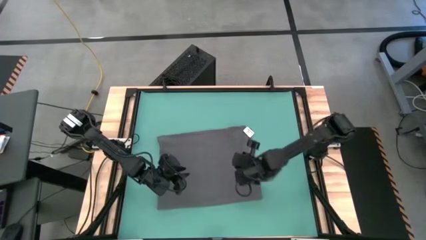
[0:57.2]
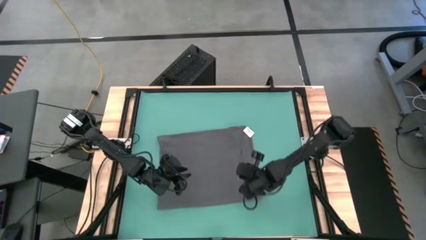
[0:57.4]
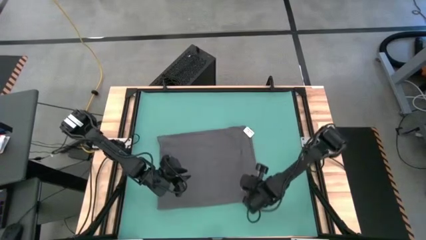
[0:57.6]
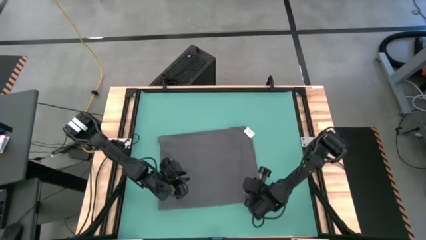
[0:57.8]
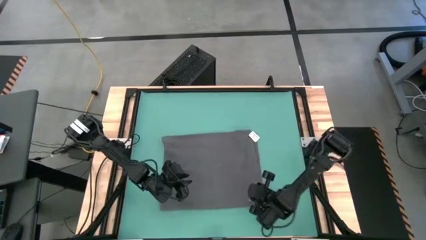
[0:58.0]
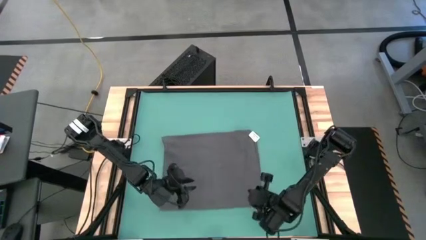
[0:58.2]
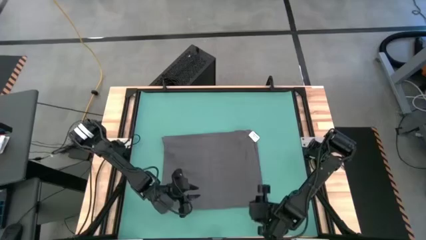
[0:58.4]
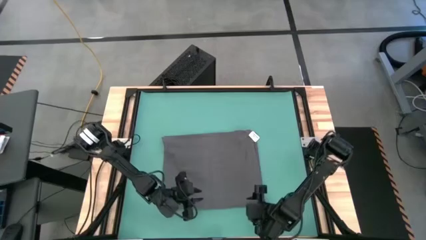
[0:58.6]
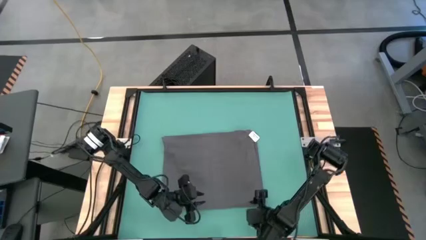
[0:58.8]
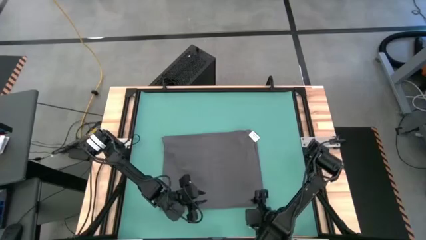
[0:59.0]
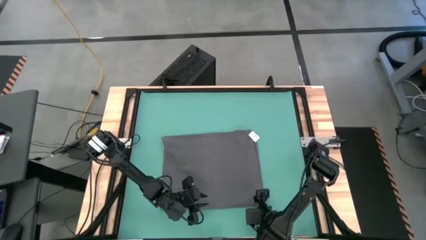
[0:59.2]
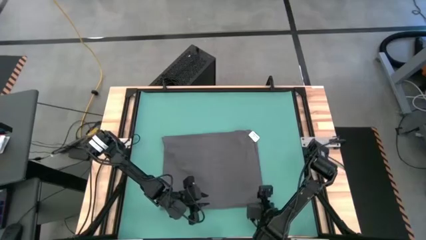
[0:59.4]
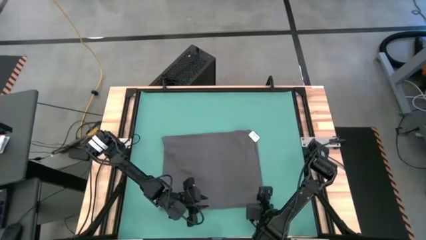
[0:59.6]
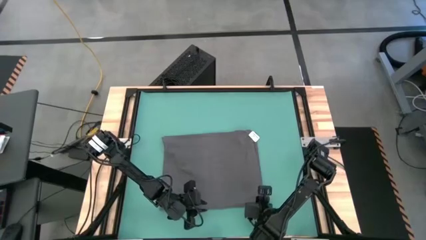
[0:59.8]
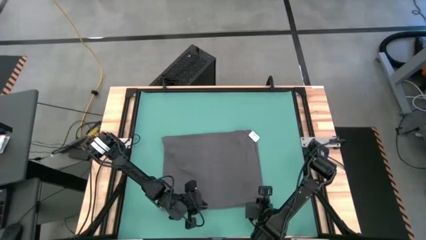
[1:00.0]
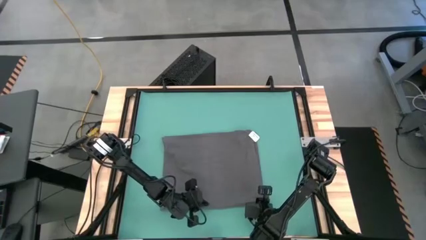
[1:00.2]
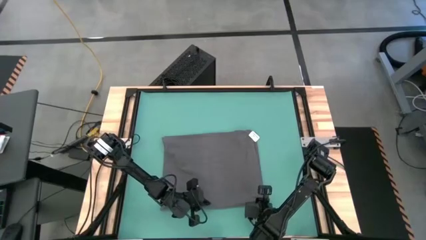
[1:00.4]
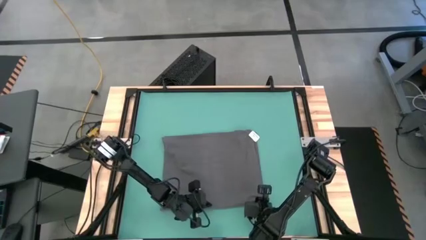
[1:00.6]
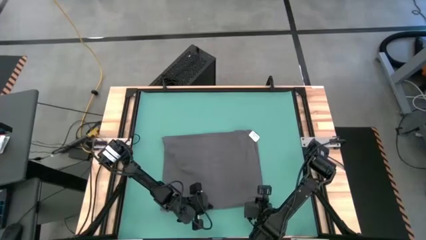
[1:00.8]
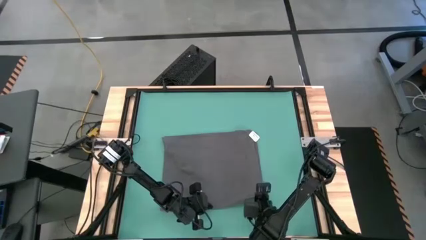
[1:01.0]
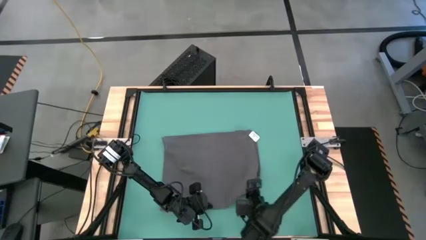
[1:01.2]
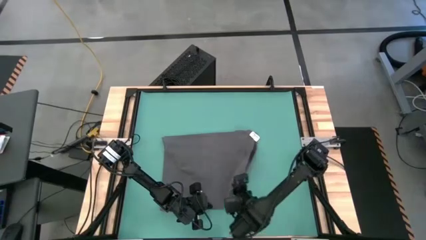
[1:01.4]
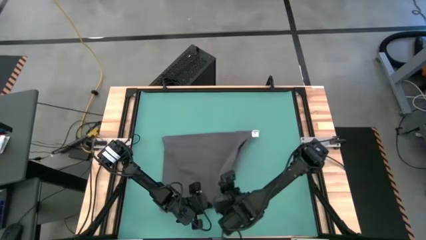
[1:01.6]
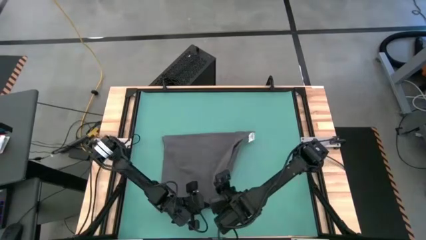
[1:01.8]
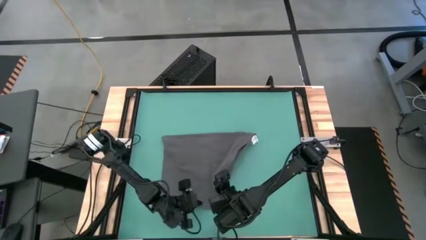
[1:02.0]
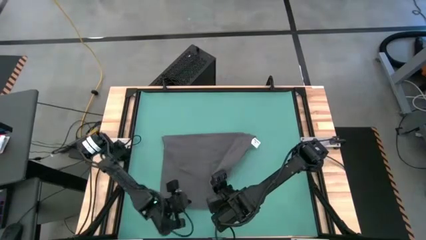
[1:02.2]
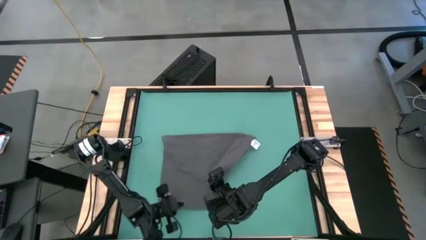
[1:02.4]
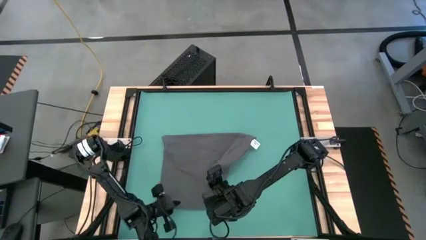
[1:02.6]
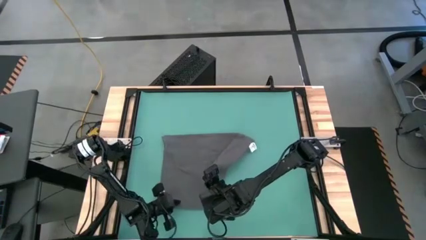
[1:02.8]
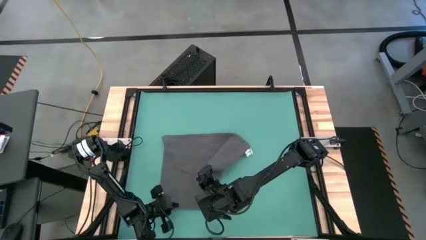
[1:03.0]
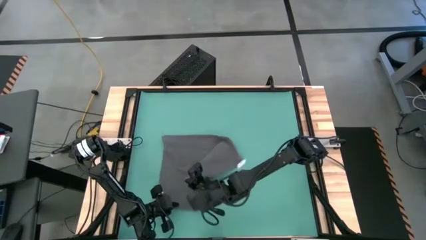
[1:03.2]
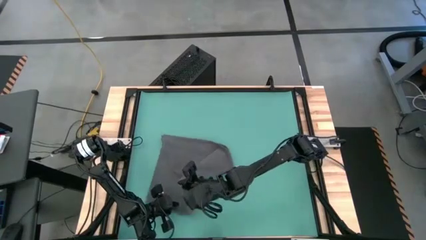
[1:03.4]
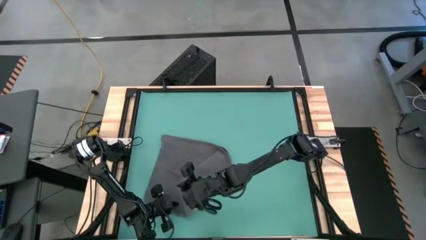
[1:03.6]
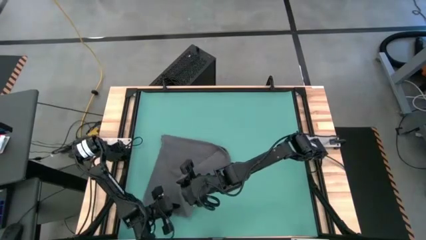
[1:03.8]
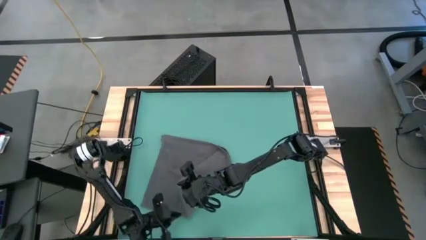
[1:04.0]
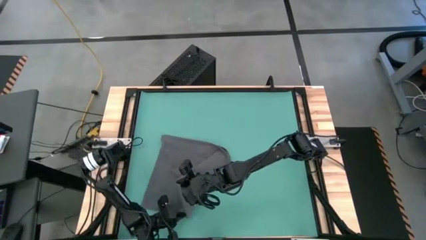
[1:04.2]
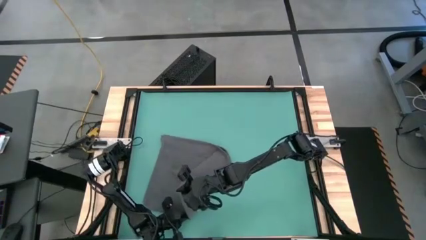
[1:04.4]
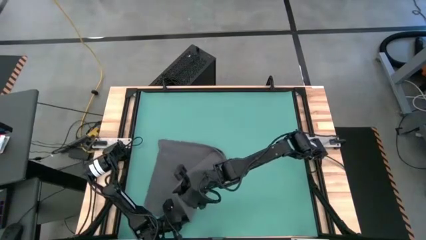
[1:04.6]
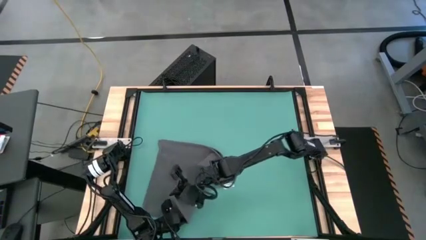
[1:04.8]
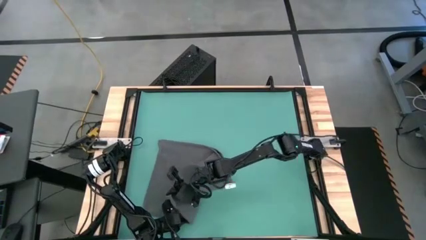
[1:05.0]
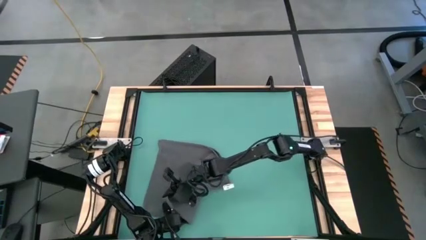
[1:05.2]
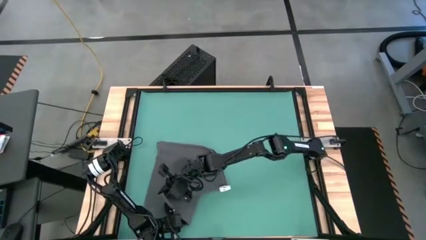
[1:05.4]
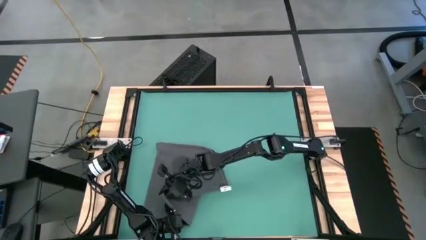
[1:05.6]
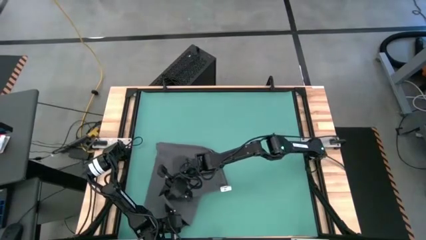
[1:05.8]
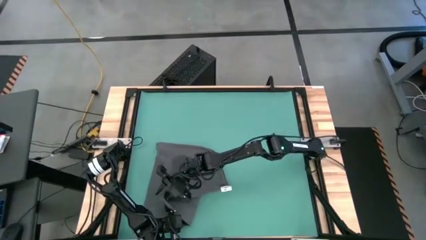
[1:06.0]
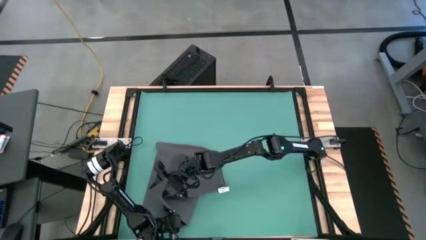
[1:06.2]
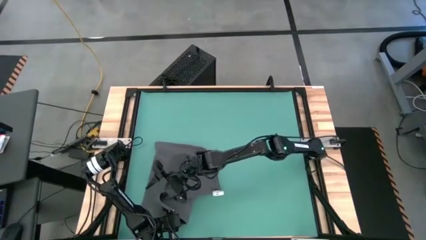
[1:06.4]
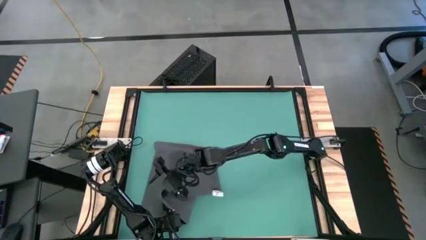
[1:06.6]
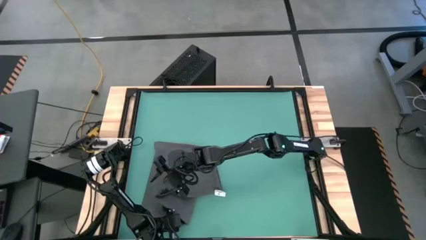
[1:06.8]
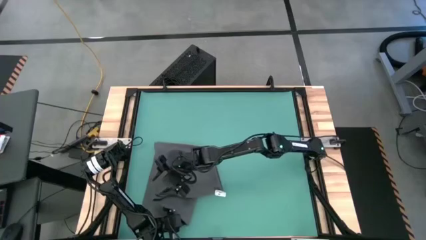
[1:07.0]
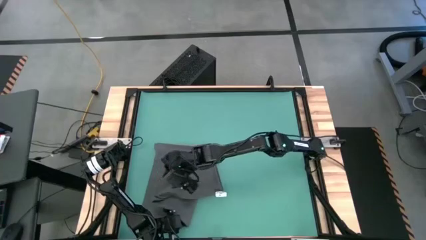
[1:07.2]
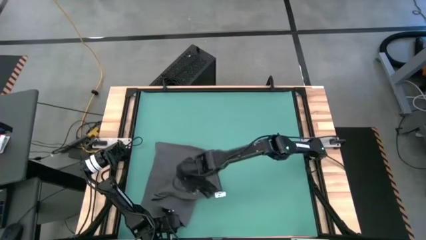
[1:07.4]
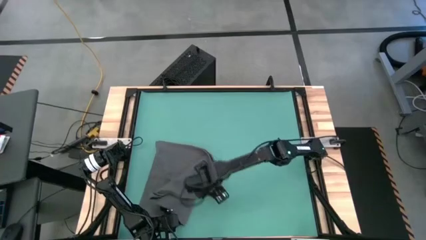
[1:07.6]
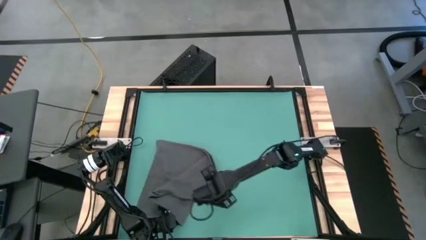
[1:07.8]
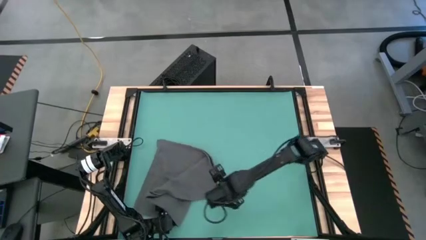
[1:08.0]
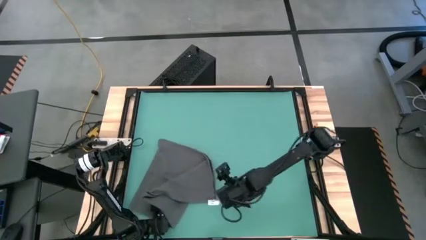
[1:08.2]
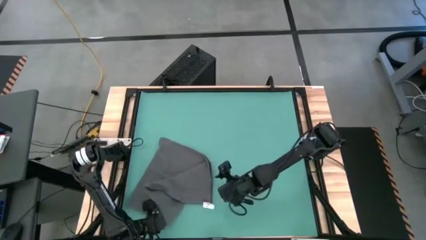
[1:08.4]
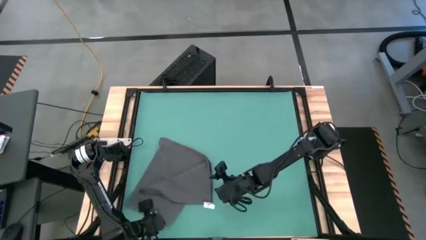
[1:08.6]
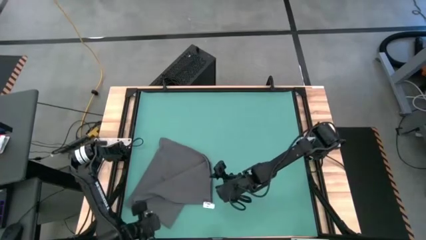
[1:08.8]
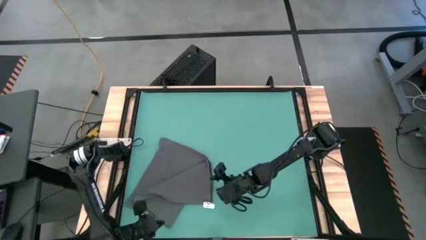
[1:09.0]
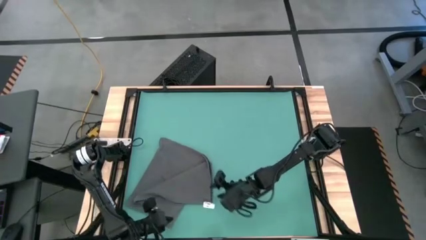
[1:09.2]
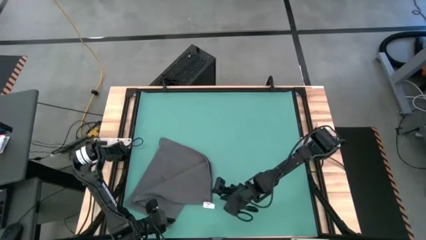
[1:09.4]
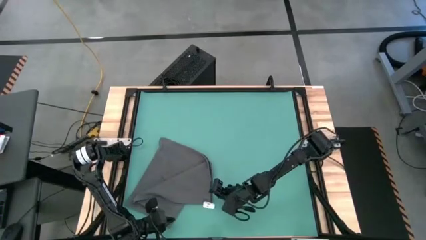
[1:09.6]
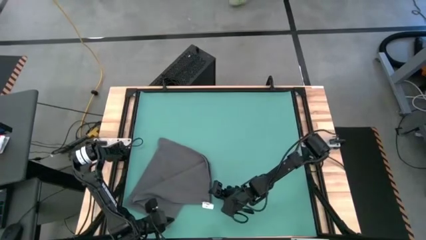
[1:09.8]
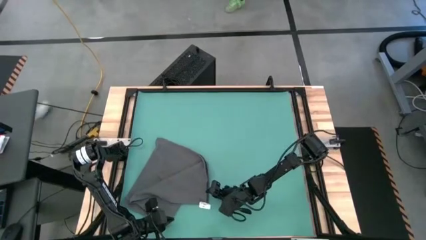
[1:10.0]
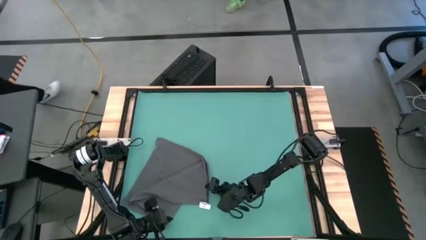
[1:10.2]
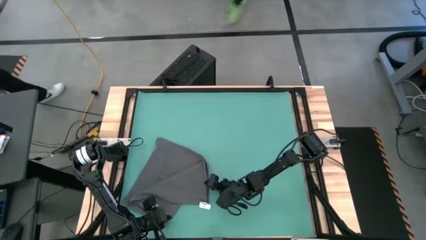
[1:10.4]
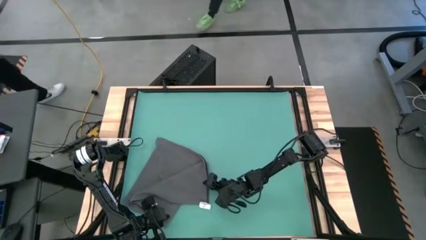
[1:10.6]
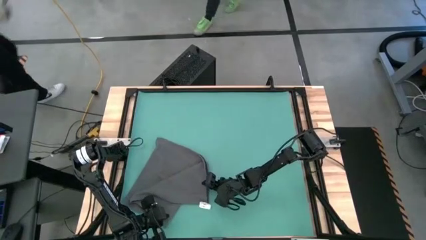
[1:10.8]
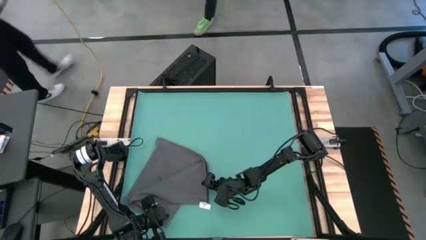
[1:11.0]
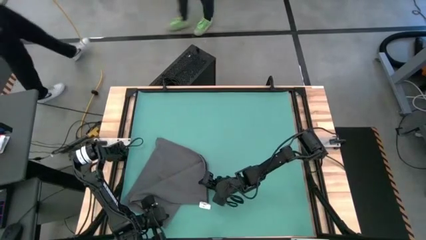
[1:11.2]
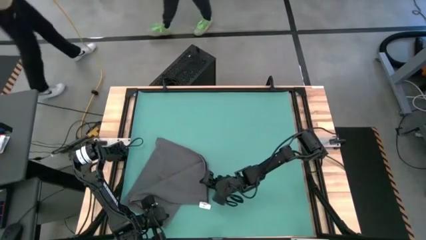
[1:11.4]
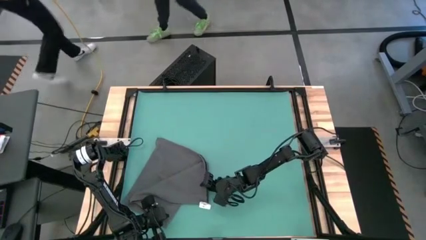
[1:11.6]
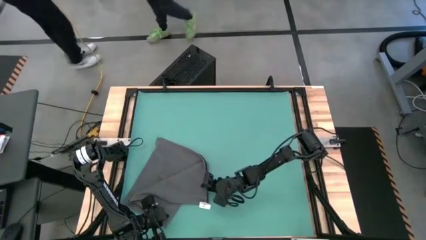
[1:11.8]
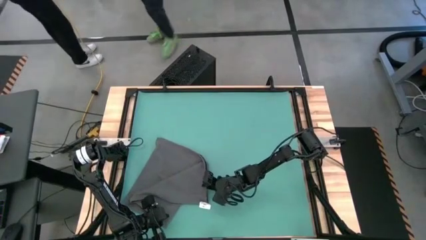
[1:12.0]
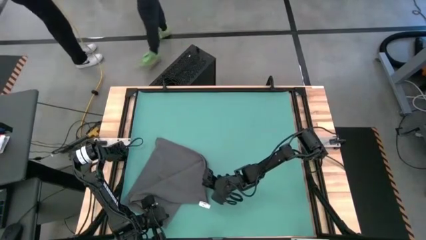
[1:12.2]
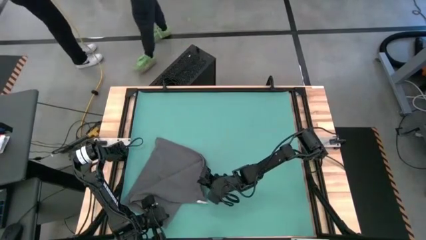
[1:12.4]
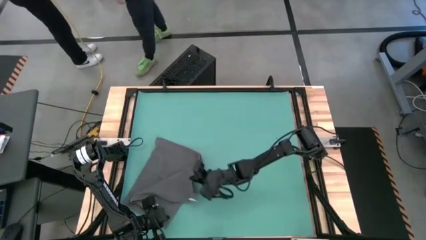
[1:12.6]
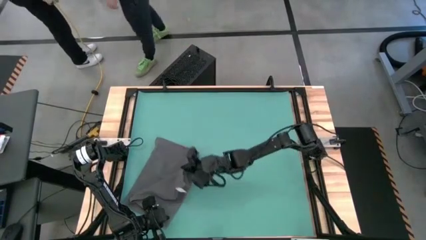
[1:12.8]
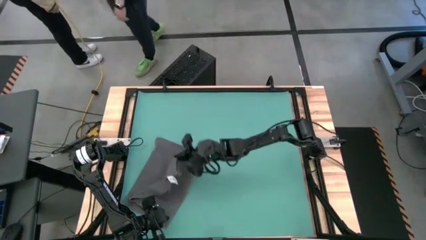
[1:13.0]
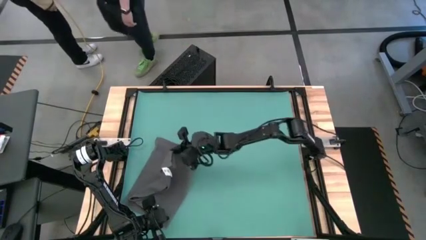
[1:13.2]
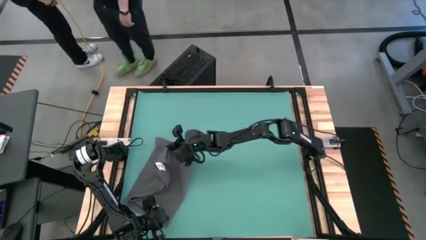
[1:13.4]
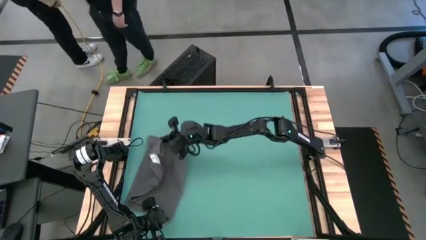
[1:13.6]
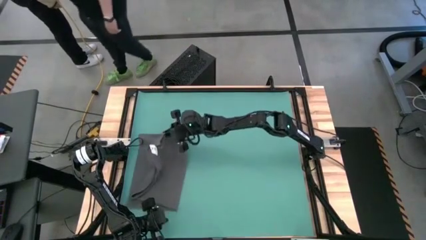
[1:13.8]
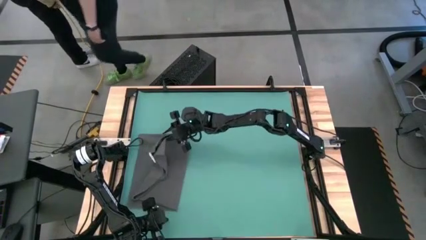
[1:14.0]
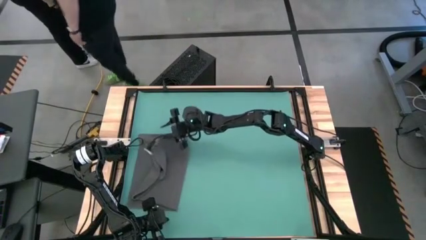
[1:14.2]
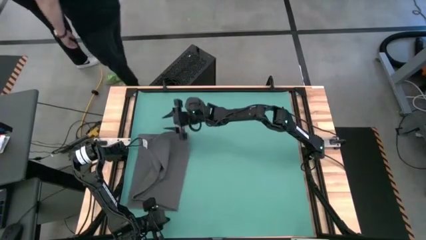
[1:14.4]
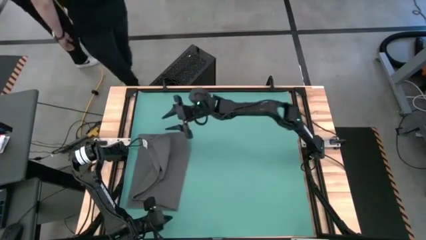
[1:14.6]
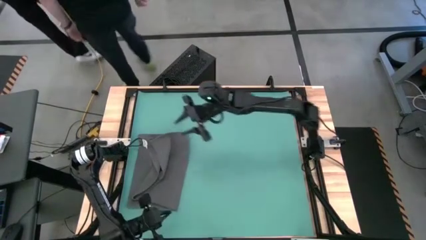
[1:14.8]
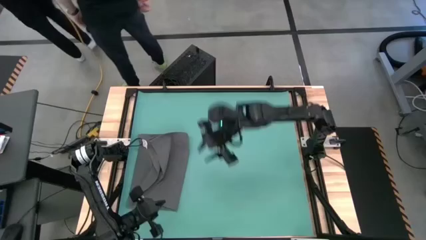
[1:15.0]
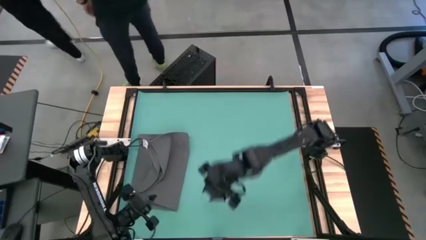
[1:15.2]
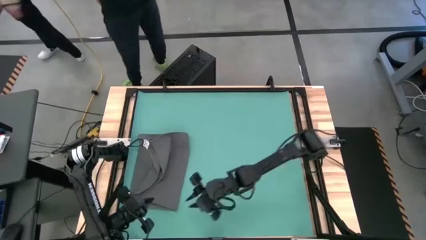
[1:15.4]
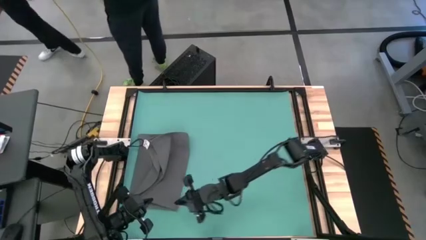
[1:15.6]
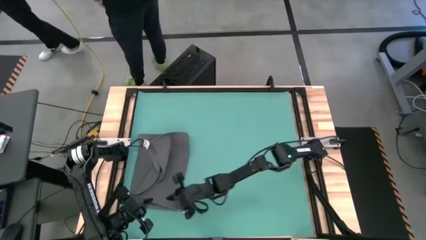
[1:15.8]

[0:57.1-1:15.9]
Task: Roll towel
Roll the gray towel
